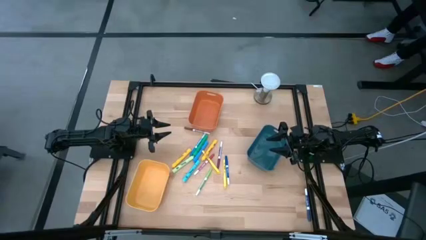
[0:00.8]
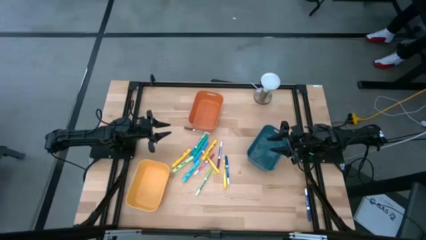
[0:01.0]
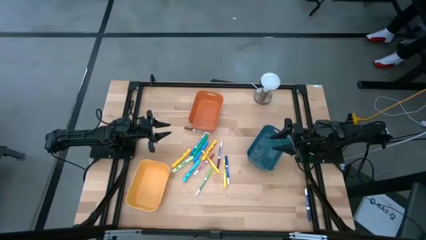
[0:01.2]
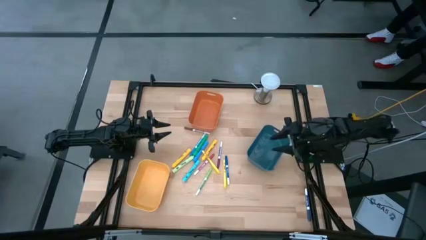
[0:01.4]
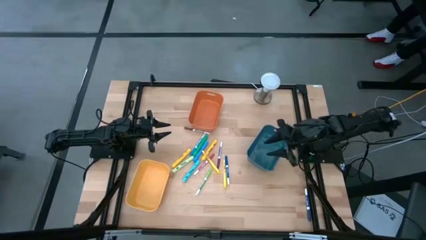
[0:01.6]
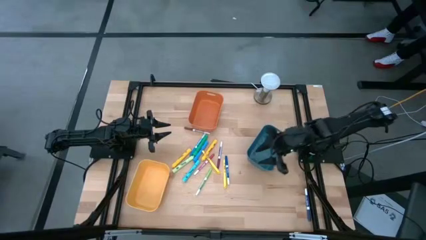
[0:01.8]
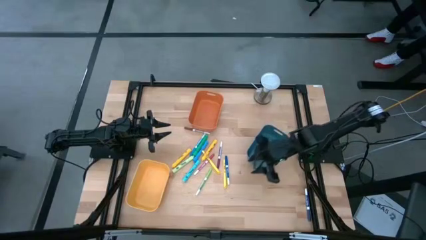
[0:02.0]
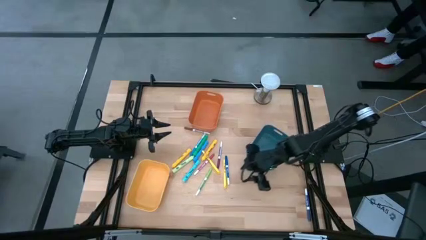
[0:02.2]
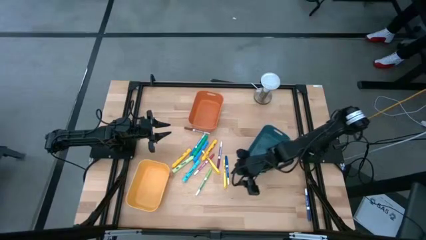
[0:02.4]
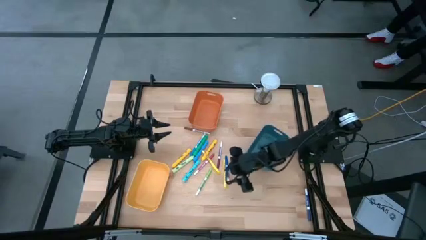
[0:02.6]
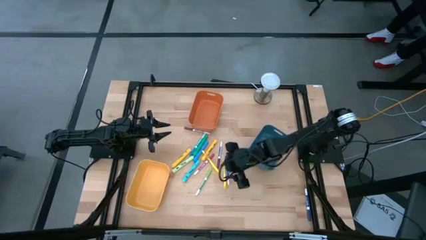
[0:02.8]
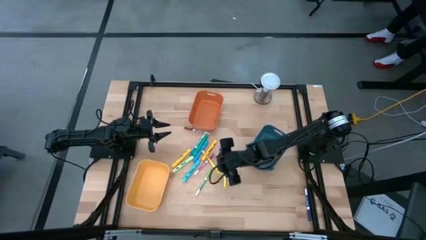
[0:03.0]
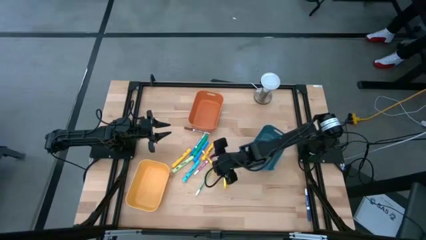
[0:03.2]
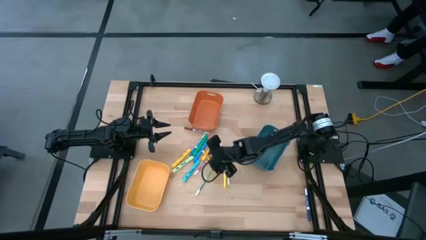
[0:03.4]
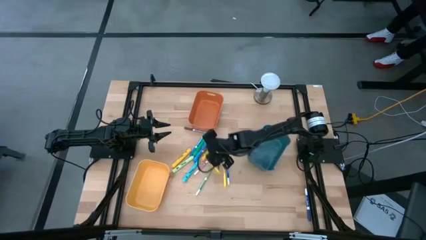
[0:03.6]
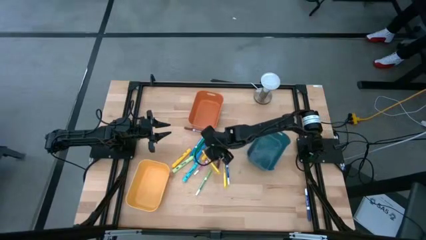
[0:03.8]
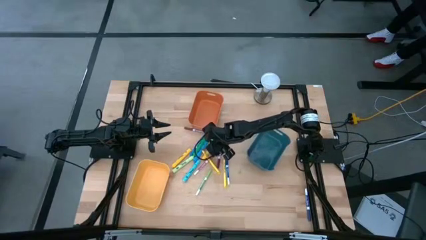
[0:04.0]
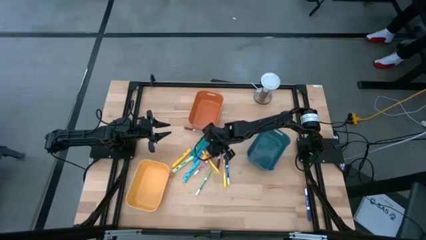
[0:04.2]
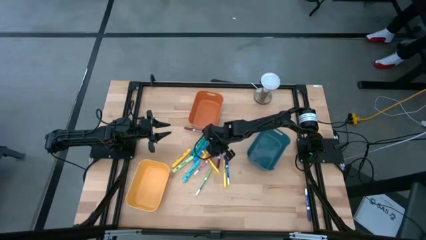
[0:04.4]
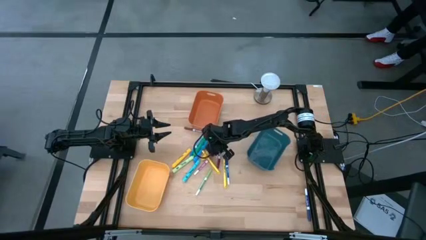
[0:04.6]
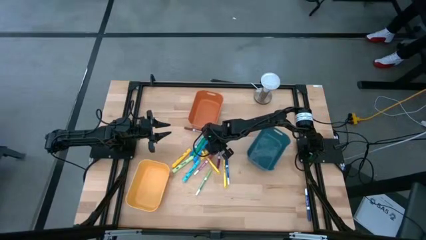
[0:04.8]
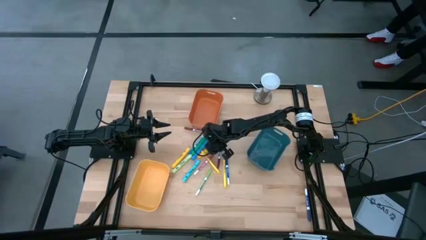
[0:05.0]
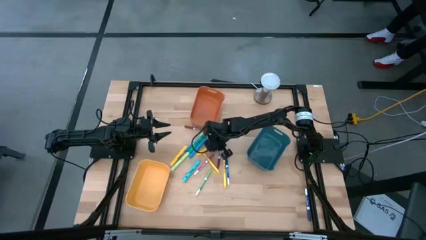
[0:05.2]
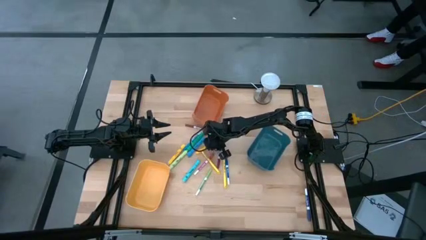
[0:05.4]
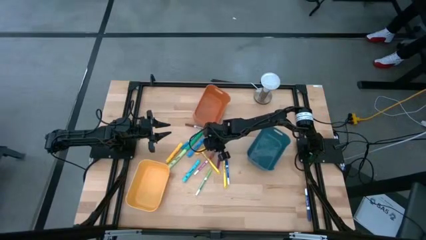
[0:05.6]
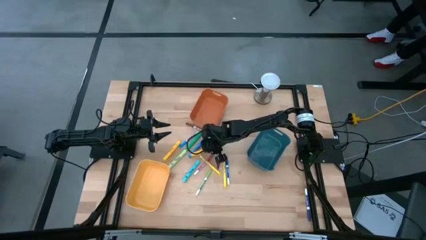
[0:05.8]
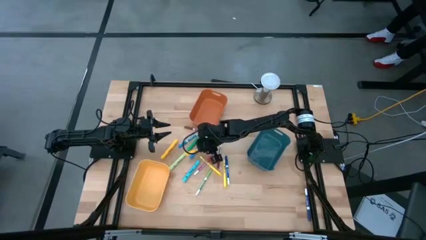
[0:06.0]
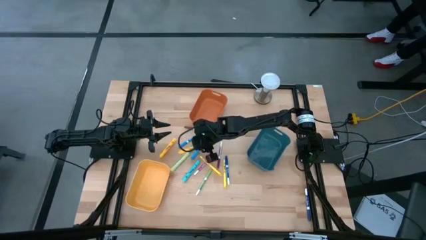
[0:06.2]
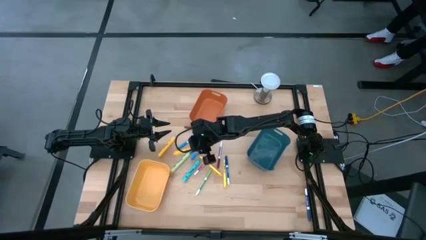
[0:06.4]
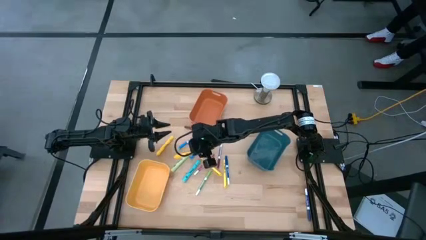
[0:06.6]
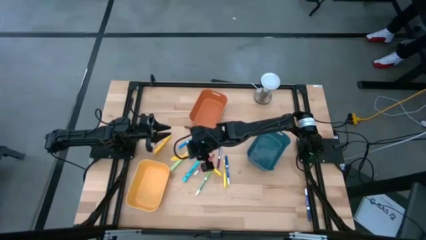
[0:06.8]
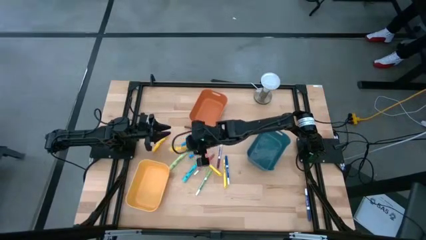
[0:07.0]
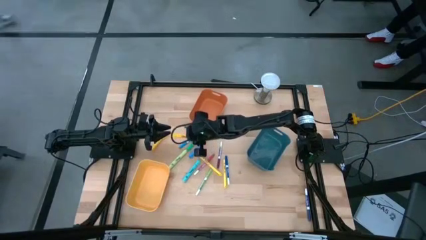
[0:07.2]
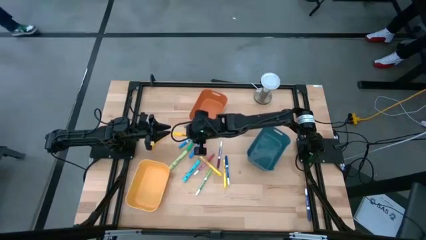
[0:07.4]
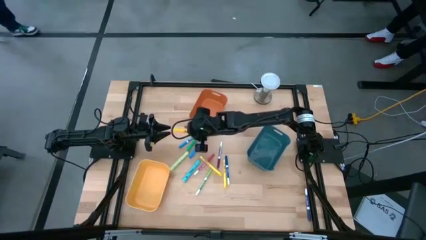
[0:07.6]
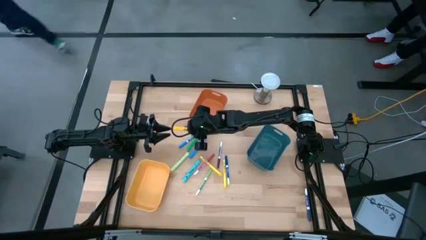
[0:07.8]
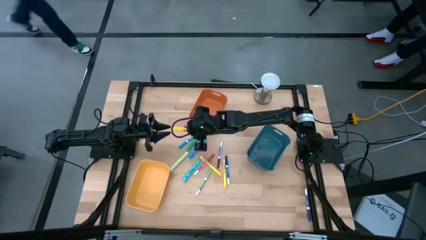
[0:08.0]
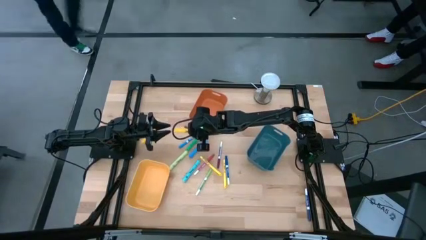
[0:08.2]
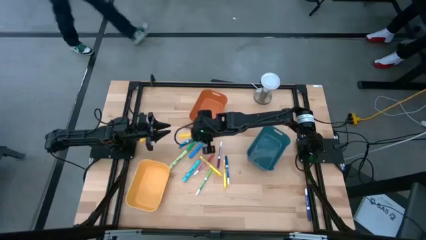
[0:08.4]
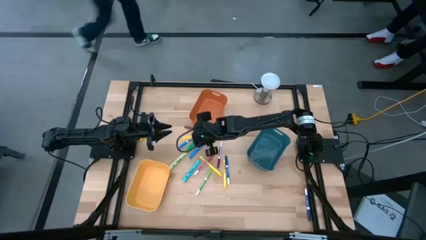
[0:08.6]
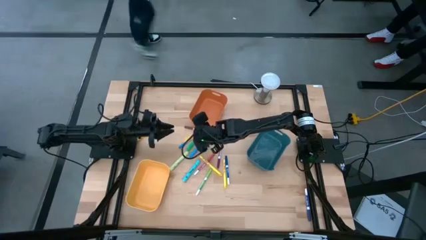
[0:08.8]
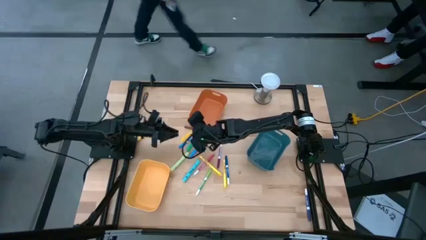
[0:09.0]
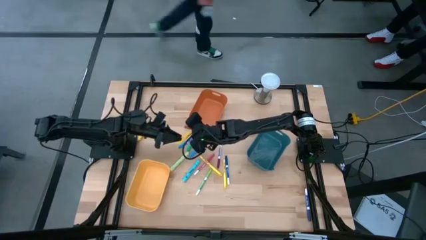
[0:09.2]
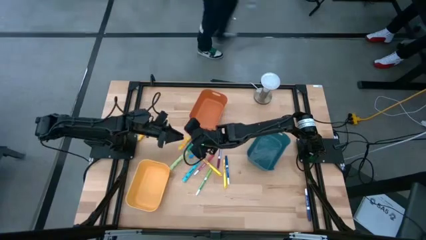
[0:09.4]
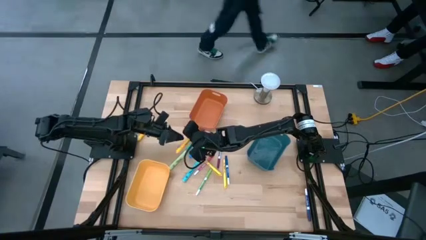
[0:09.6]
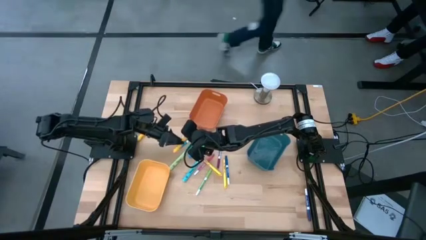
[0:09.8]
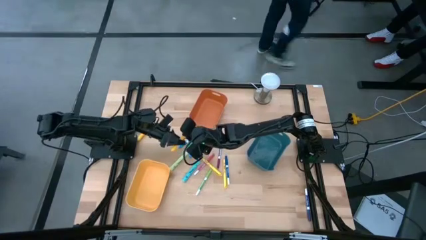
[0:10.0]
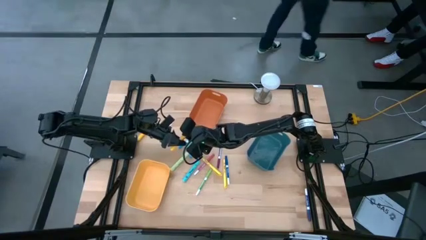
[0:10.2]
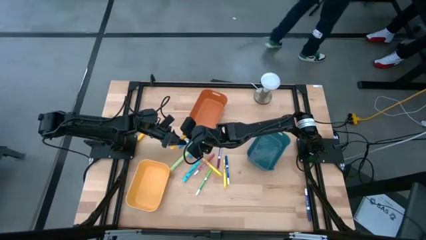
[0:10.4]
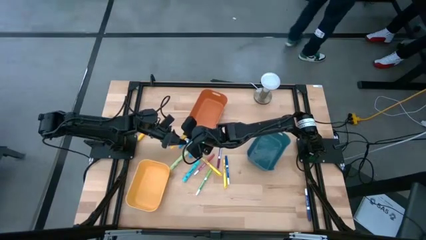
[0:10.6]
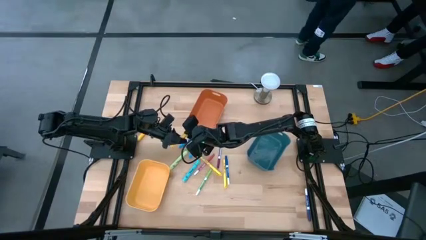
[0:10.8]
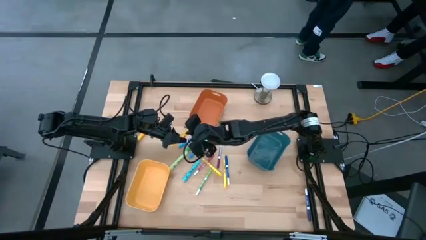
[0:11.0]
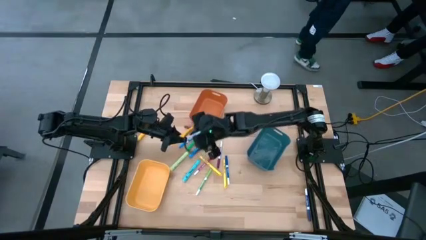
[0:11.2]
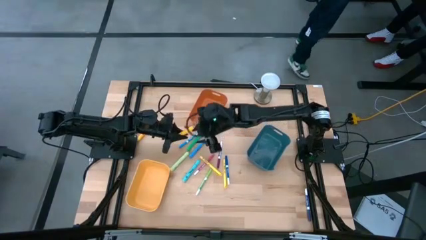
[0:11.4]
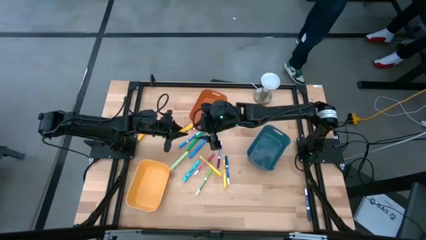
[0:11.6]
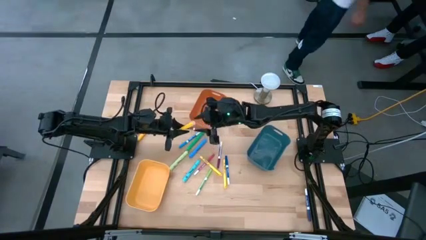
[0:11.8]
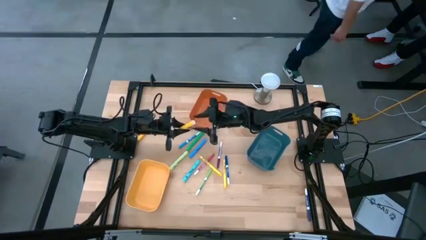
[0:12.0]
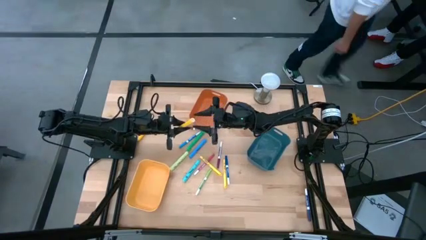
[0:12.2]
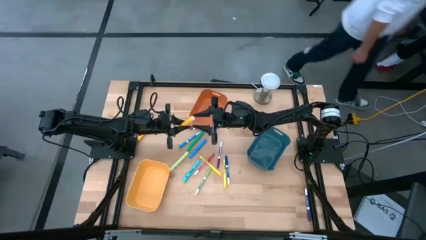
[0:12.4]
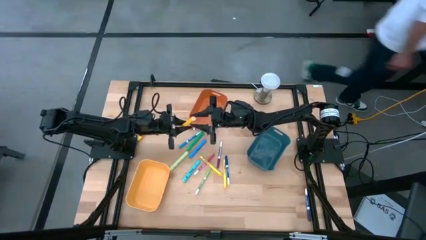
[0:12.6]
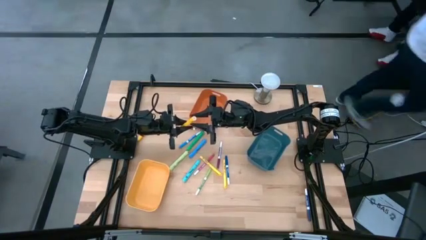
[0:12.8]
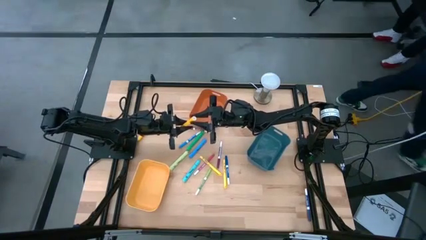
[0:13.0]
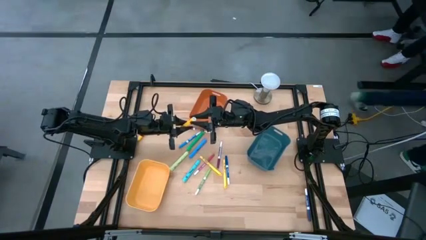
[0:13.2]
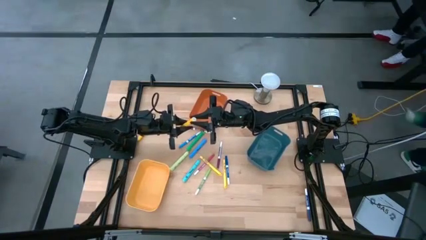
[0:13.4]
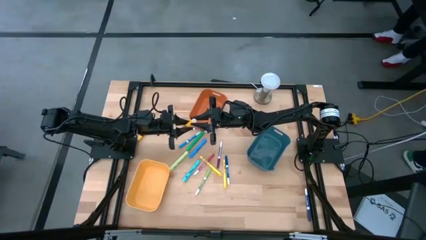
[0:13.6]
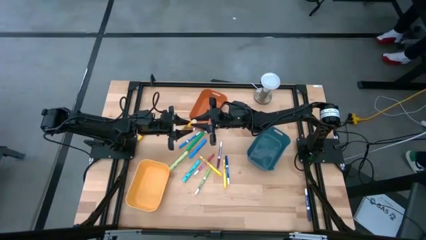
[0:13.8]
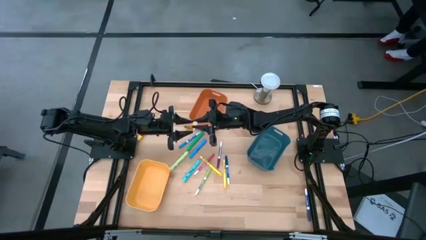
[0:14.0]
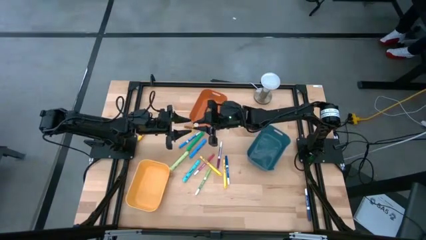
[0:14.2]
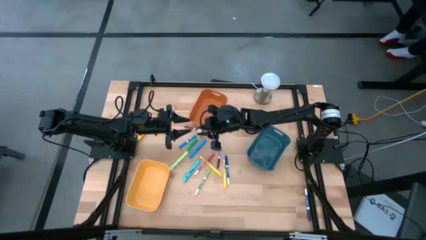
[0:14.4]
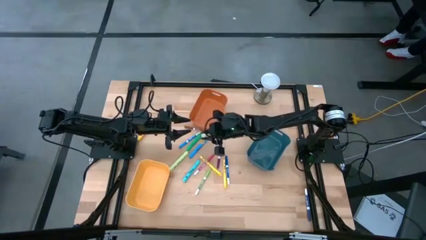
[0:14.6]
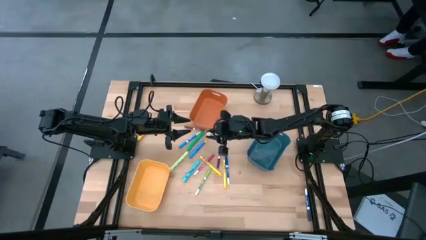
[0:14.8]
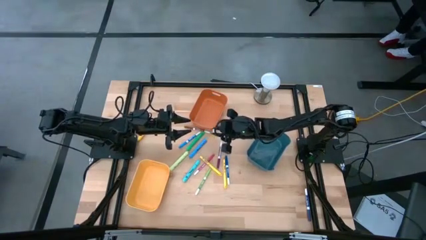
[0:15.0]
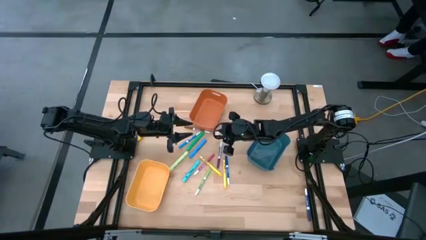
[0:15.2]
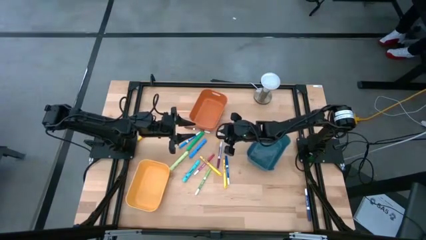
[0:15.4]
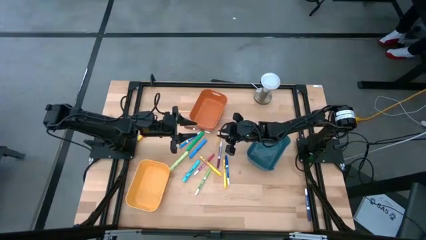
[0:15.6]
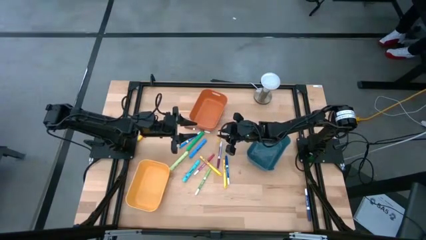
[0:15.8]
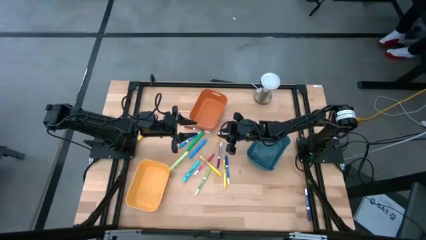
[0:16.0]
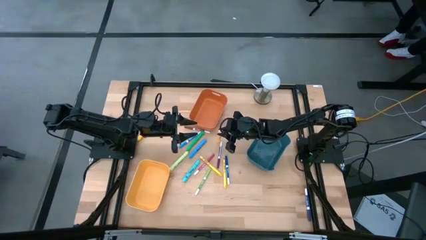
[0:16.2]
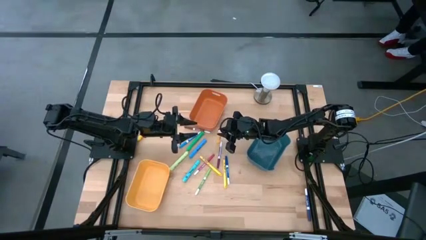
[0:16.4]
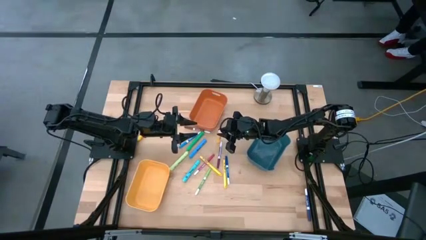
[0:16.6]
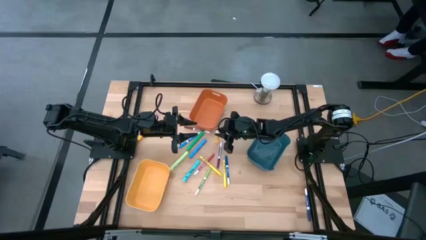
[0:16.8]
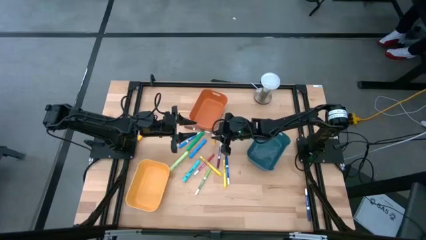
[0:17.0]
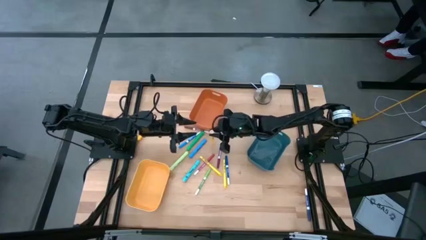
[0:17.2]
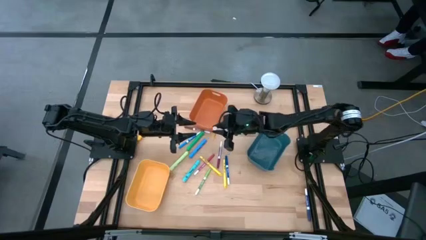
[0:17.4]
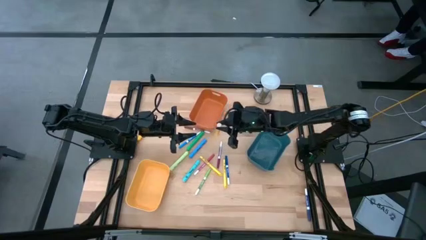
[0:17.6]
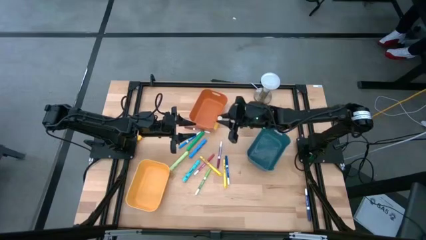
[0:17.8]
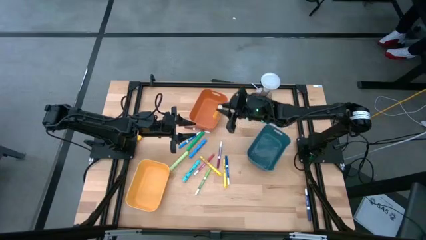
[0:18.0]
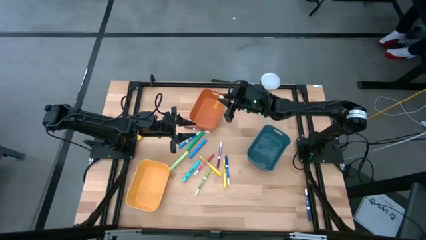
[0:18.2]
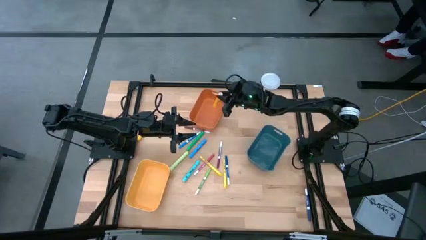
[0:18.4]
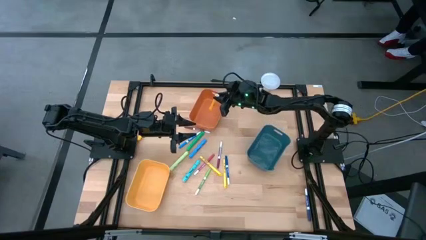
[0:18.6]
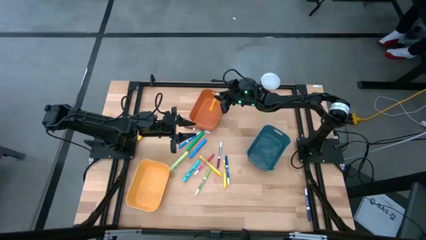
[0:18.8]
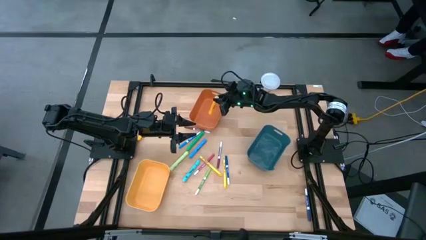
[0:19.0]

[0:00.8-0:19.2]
Task: Pick & Place Markers
Put the right yellow highlighter pen into the orange bin
